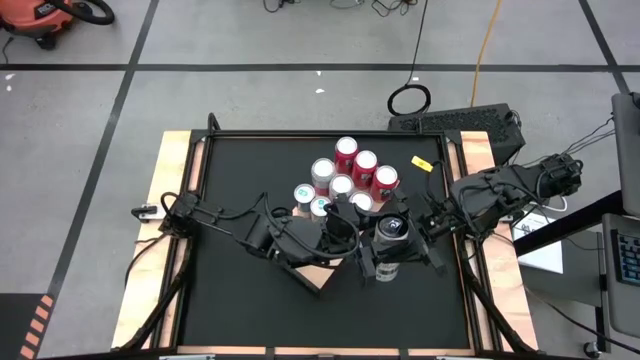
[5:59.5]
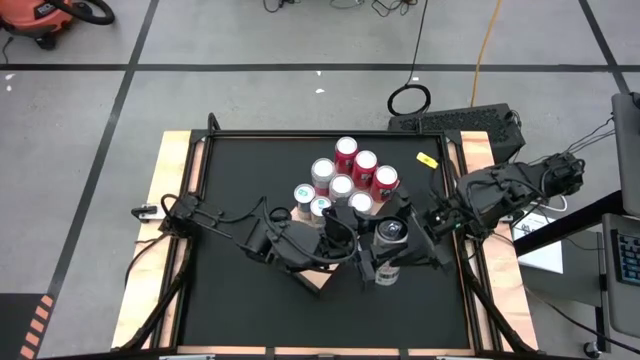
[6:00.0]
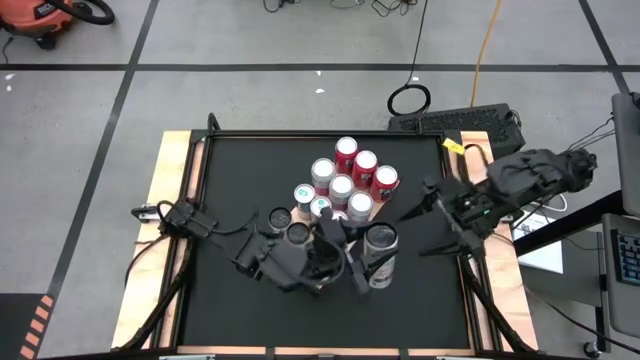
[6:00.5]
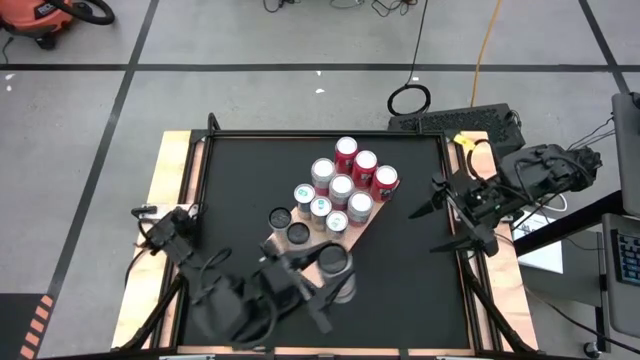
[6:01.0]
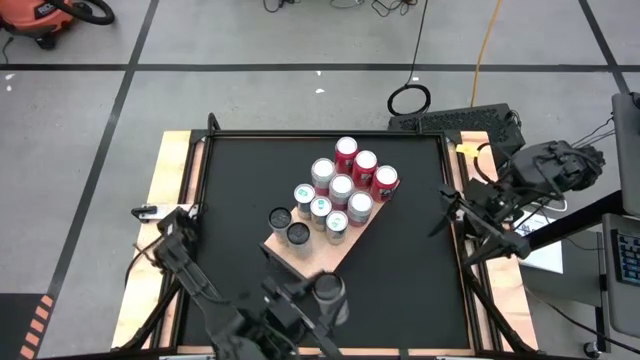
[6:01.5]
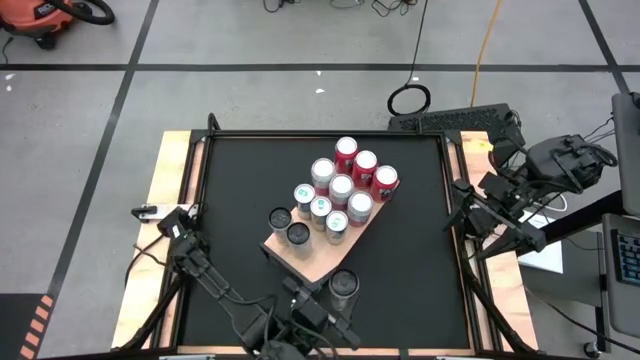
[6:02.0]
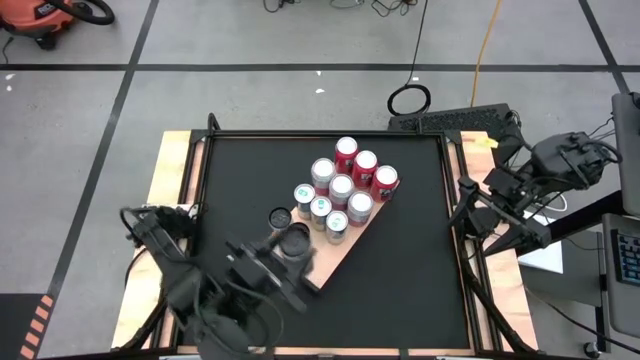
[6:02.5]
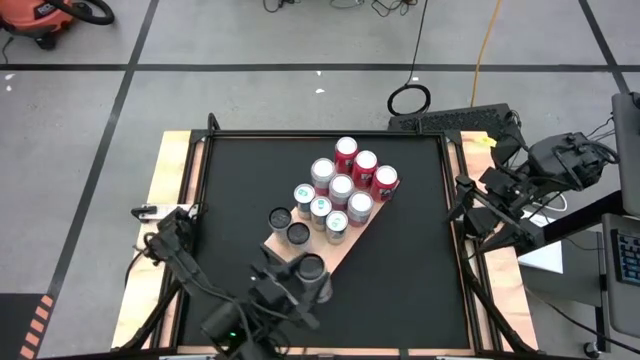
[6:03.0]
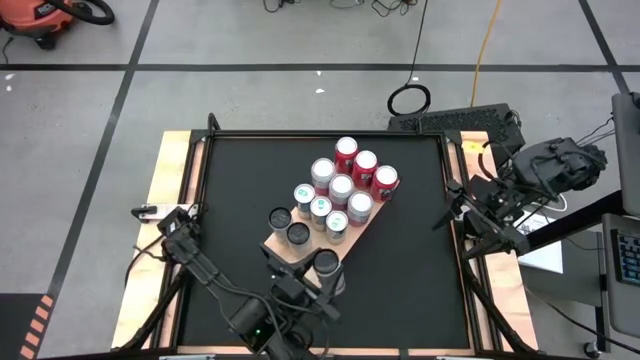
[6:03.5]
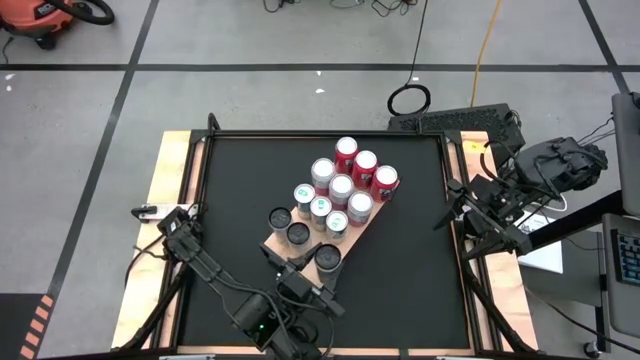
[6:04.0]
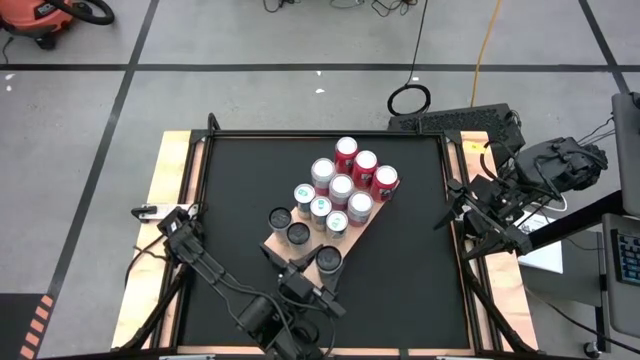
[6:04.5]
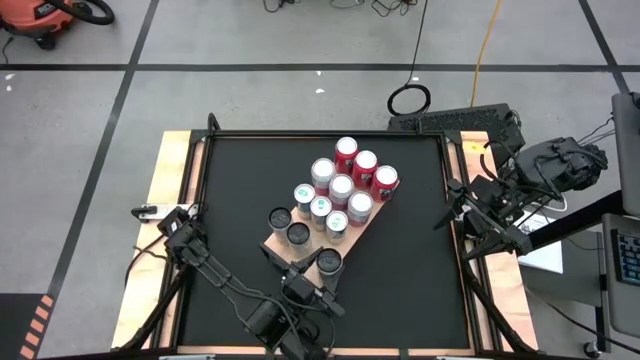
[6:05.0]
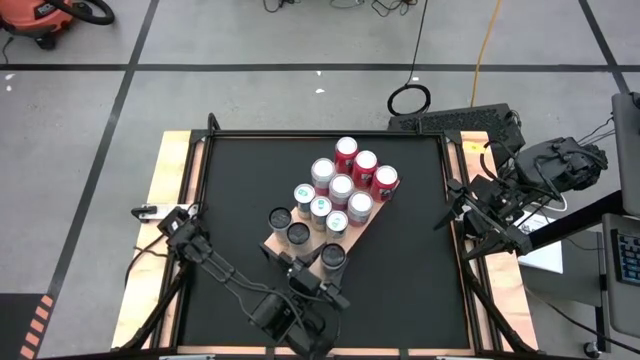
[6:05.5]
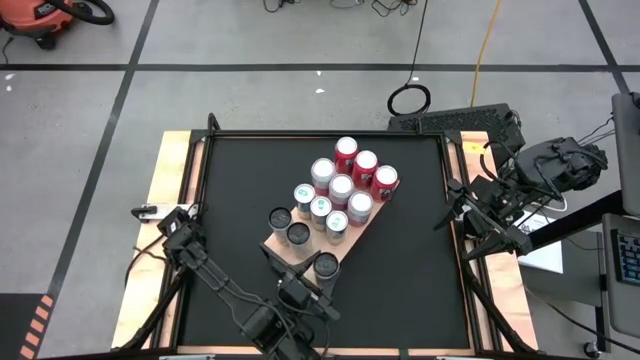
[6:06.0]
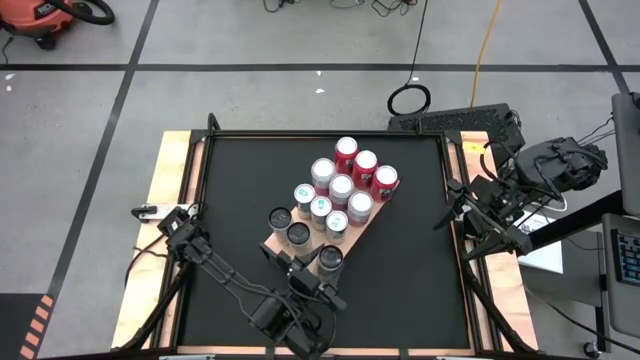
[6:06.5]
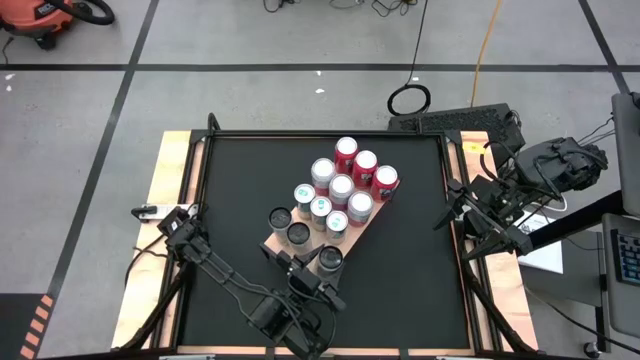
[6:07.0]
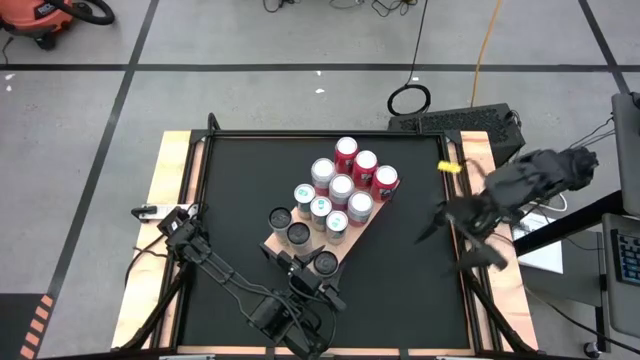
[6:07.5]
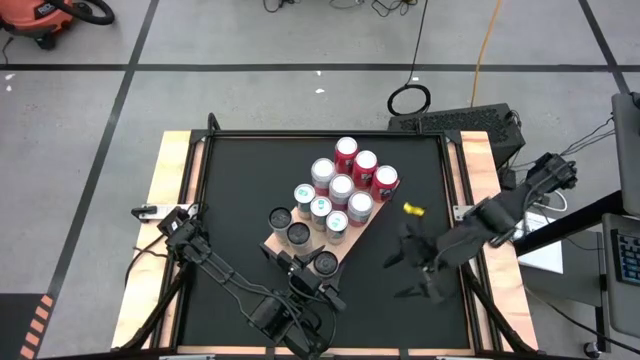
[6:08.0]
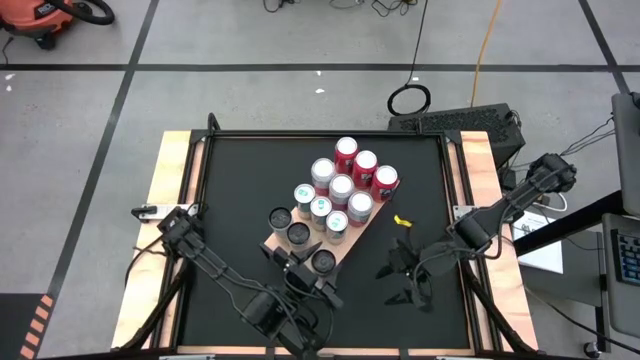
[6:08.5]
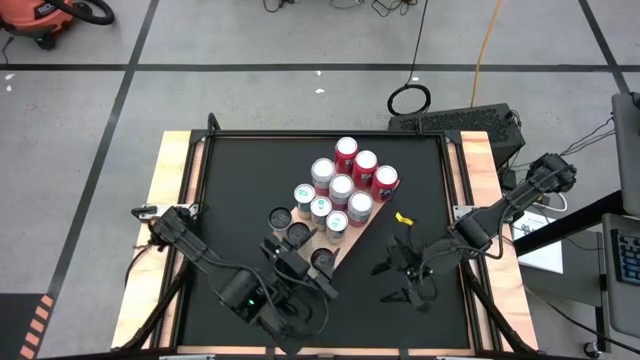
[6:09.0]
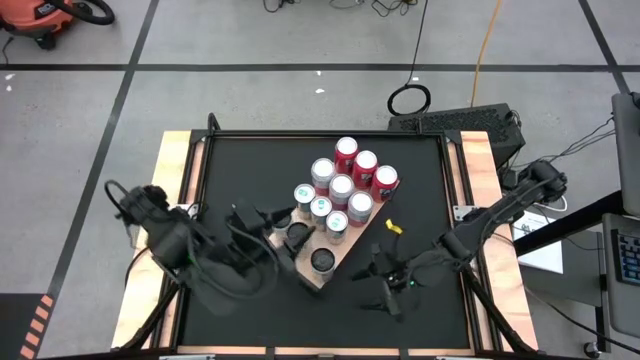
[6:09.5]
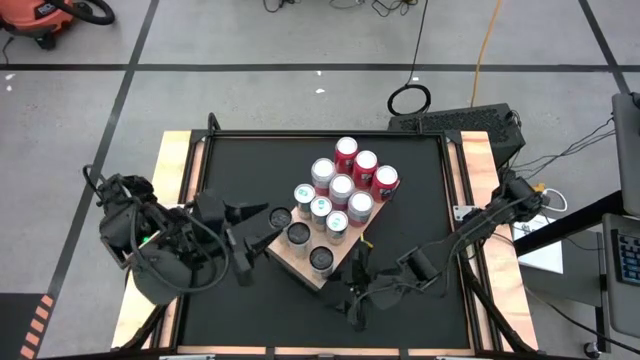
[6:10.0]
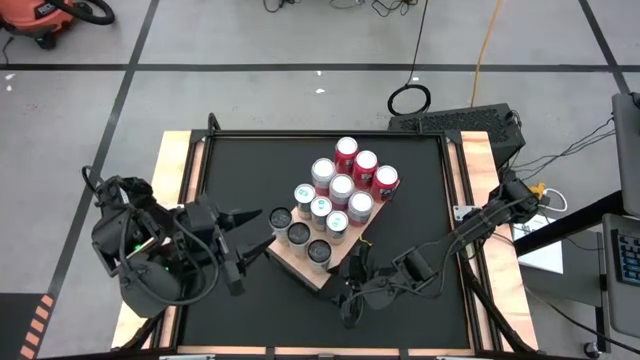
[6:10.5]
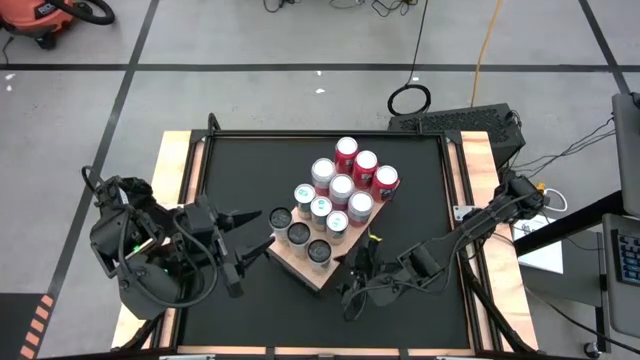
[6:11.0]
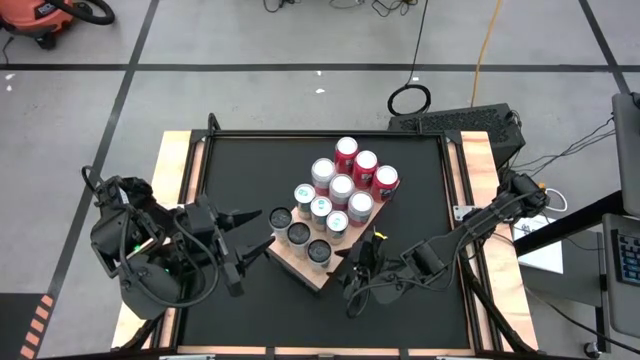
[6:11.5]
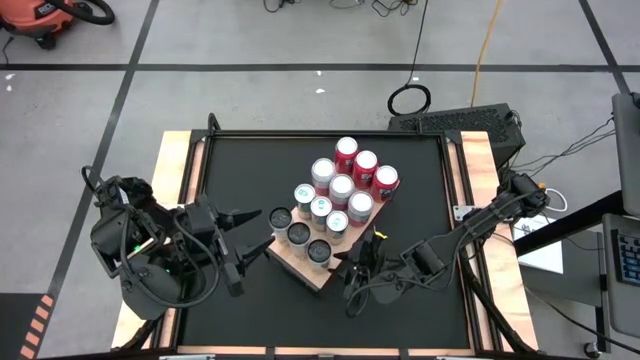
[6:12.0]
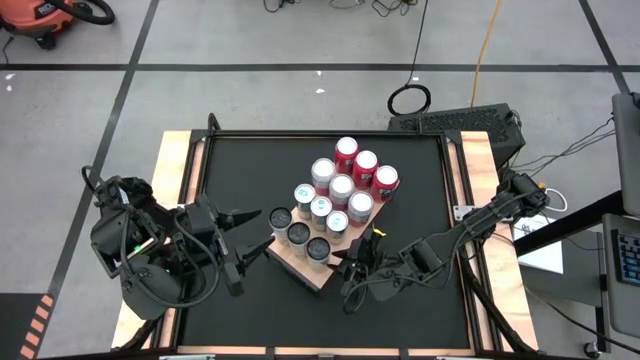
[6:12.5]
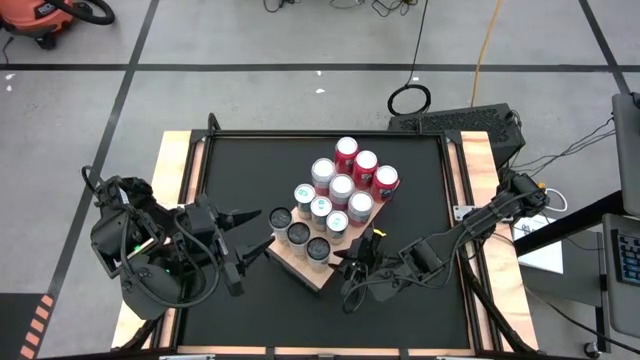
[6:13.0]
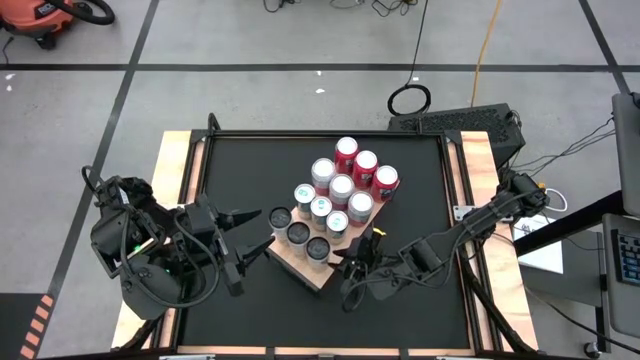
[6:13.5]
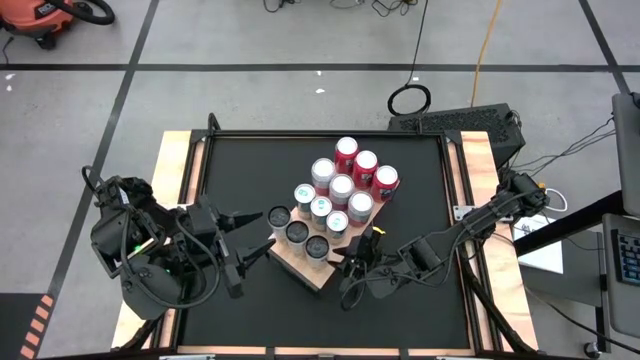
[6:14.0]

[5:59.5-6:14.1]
Task: Place canned beverage on shelf
Put the white-yellow soda can on the shelf aligned with the white-yellow soda can

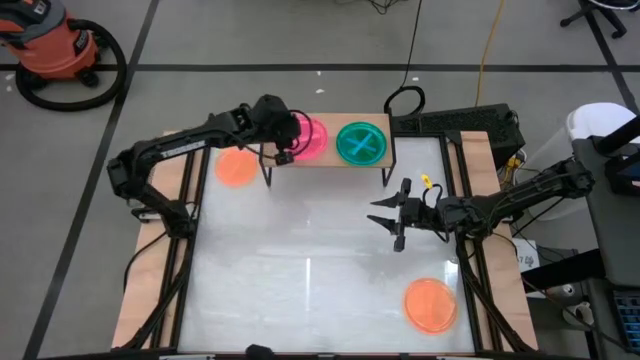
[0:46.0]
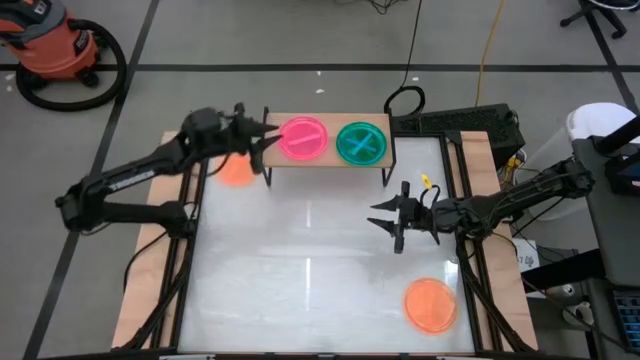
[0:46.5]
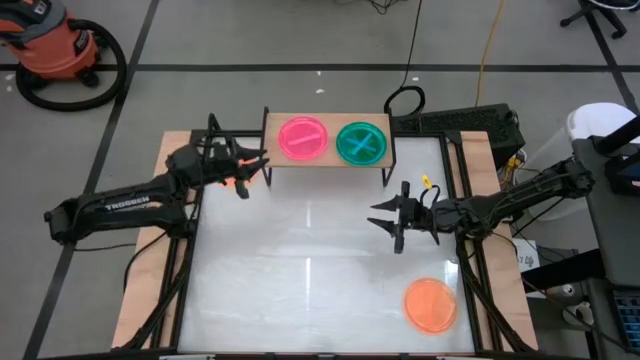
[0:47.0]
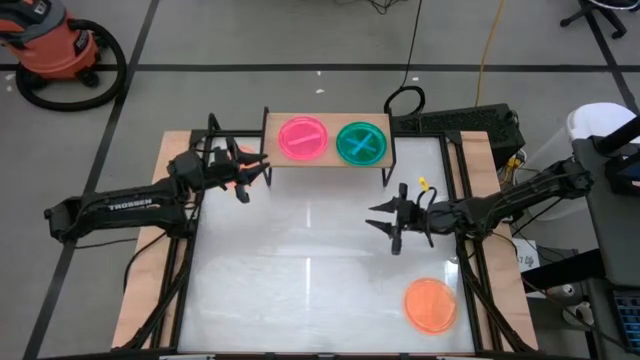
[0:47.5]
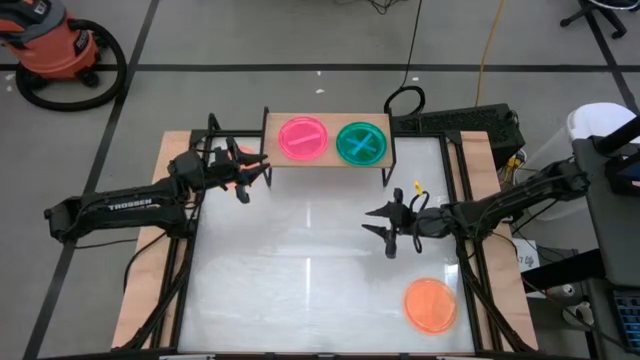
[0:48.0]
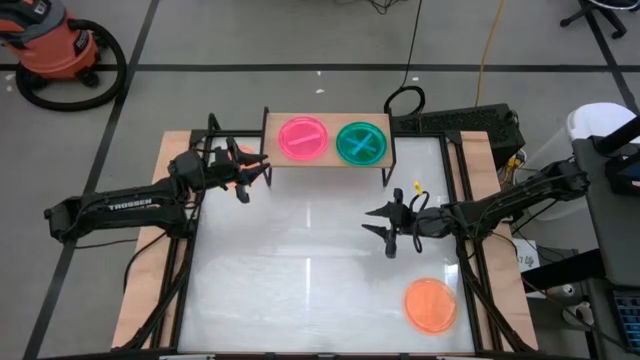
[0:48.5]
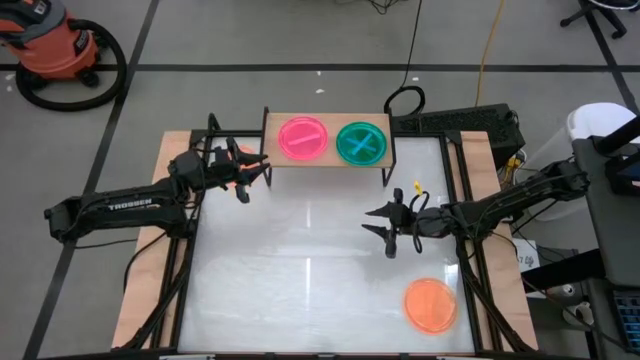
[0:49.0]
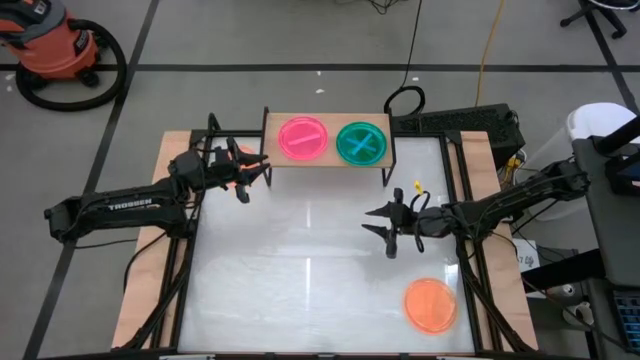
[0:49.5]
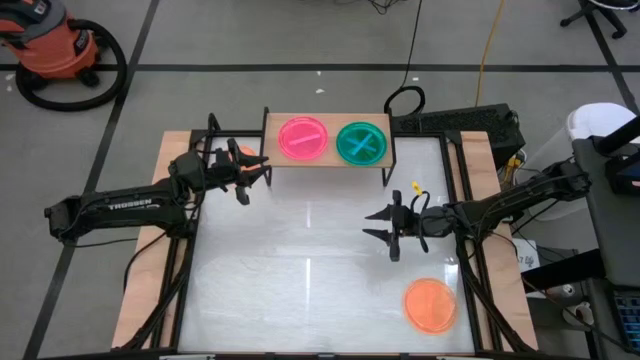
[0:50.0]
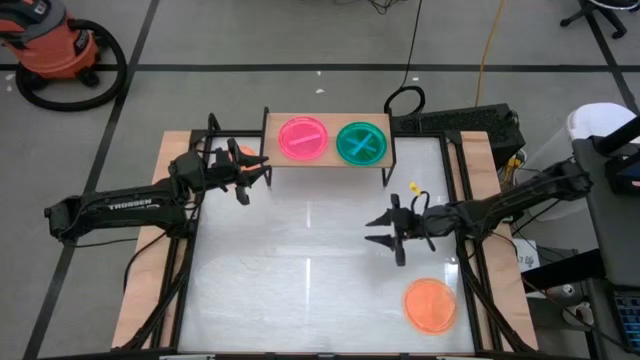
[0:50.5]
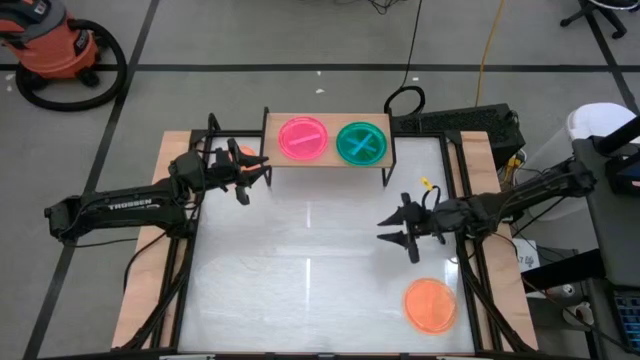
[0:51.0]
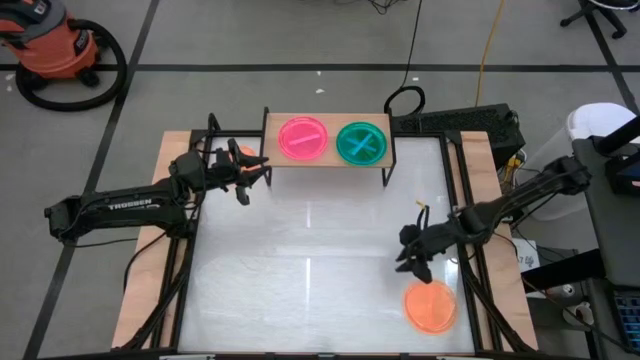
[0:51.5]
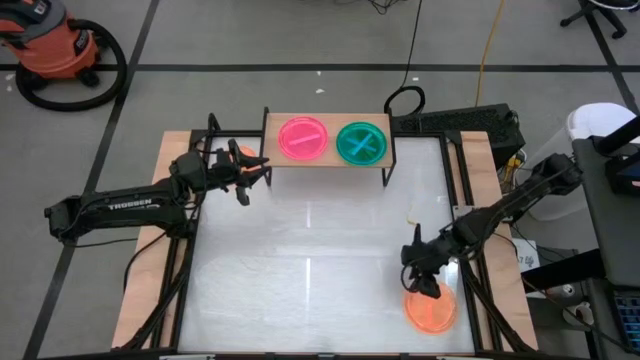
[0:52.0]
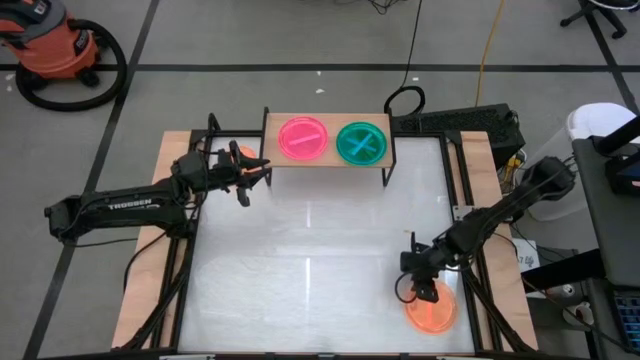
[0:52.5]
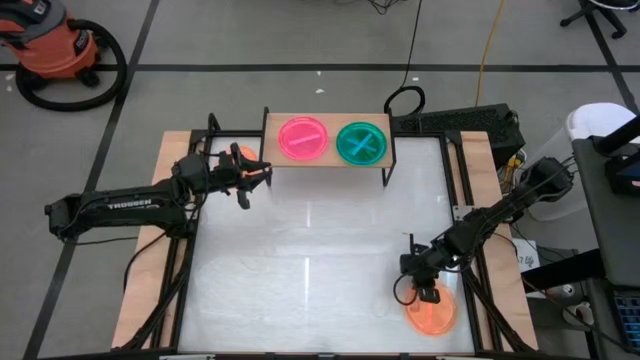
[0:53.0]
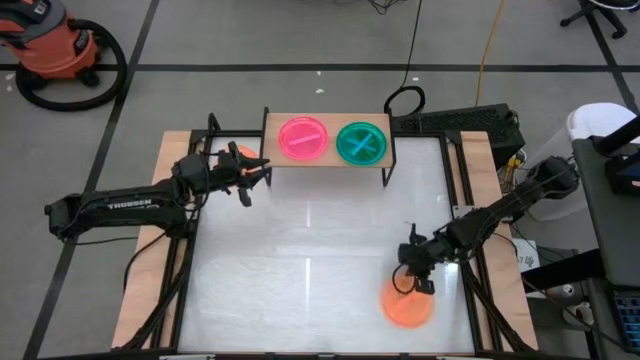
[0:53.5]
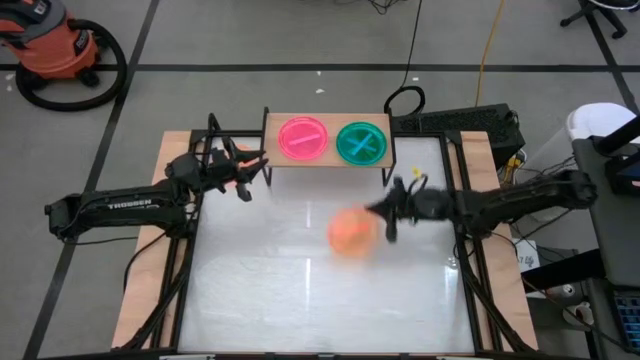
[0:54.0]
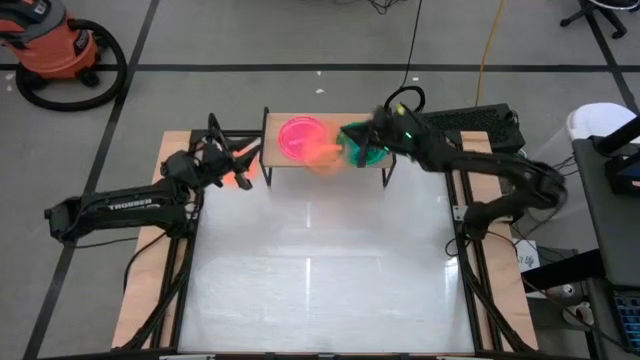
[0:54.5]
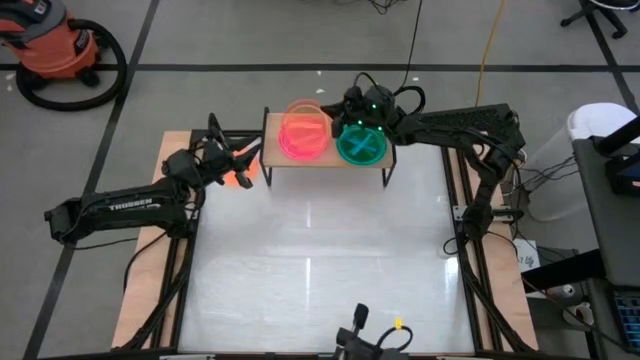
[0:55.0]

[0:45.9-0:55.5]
Task: Place and stack plates onto a shelf
Stack the bottom orange plate on top of the pink plate on the shelf
